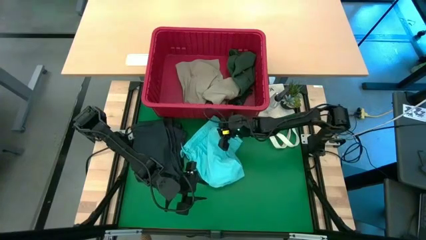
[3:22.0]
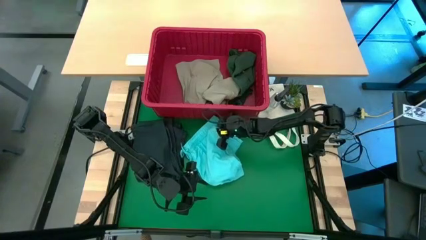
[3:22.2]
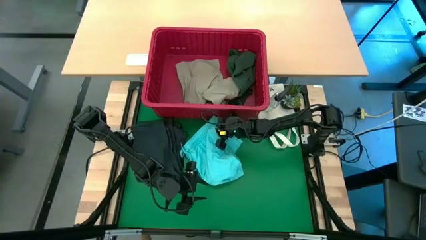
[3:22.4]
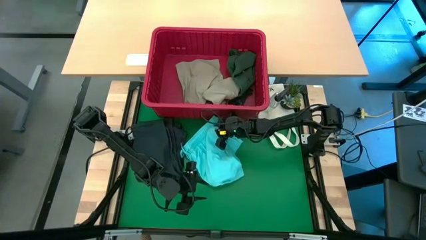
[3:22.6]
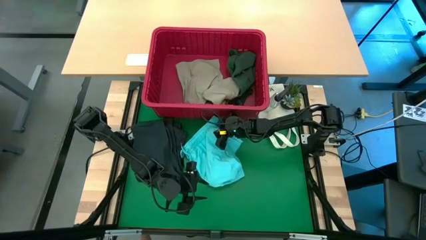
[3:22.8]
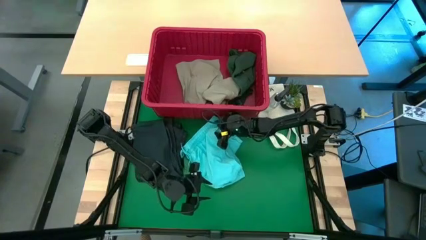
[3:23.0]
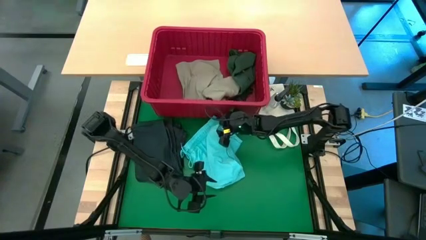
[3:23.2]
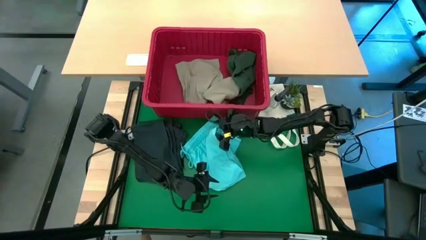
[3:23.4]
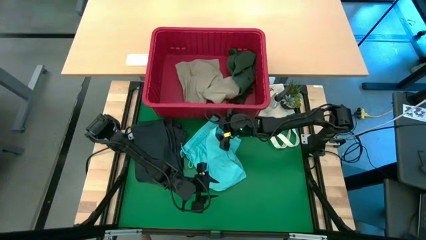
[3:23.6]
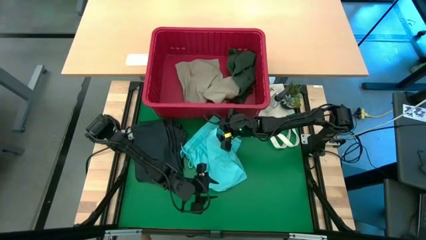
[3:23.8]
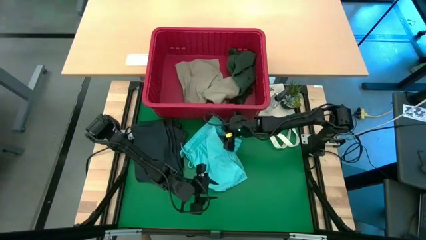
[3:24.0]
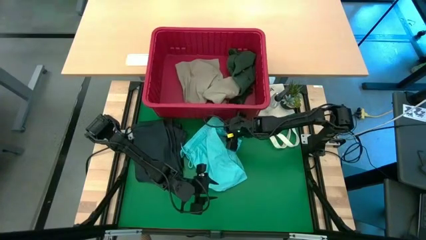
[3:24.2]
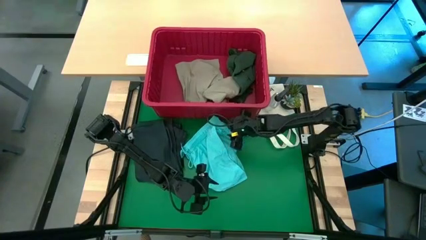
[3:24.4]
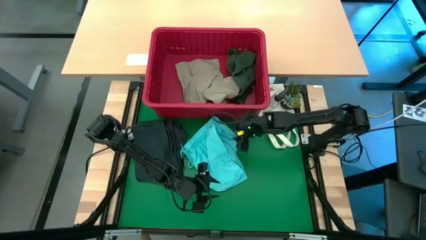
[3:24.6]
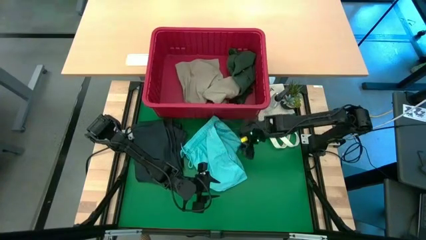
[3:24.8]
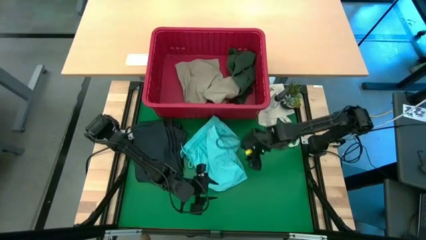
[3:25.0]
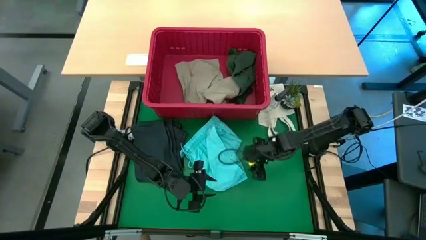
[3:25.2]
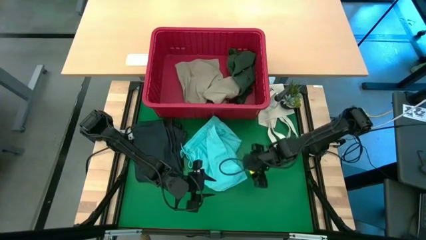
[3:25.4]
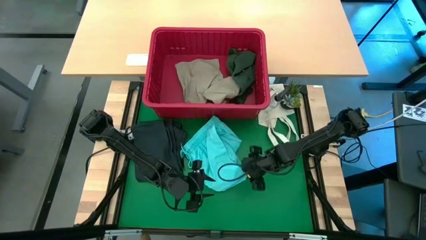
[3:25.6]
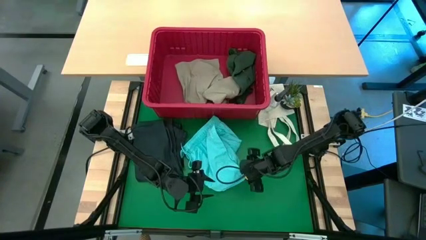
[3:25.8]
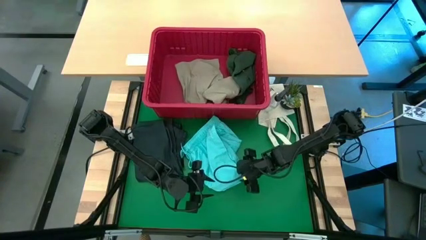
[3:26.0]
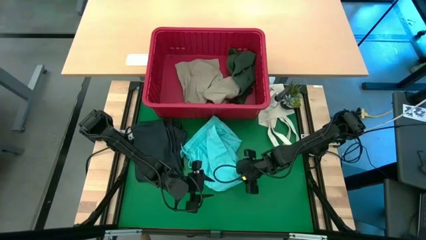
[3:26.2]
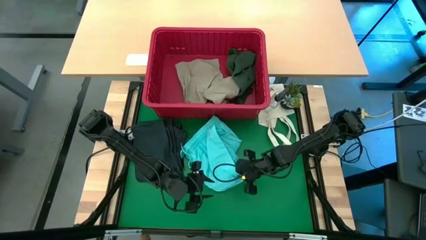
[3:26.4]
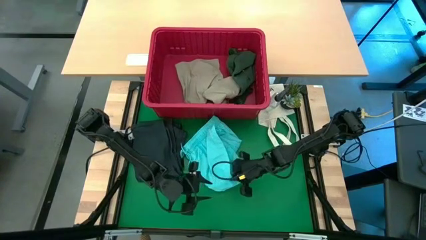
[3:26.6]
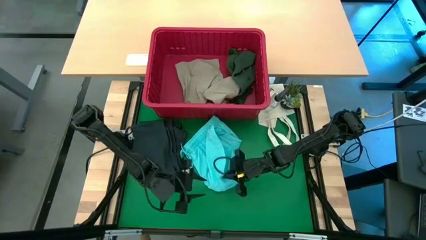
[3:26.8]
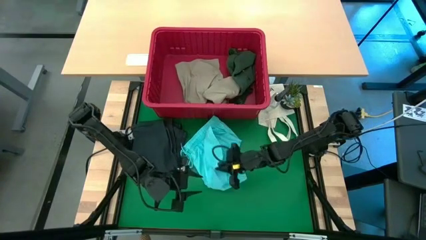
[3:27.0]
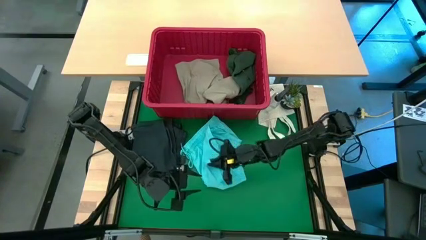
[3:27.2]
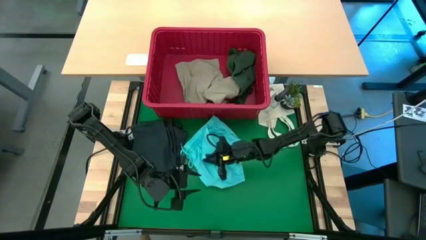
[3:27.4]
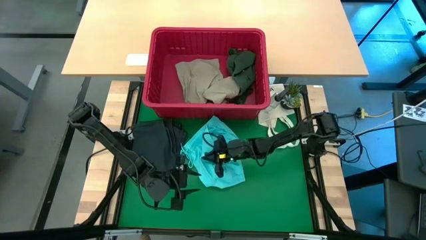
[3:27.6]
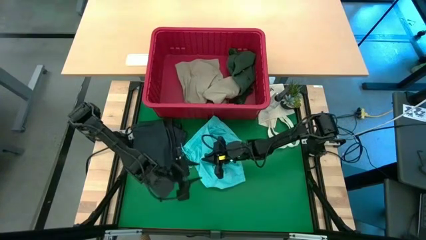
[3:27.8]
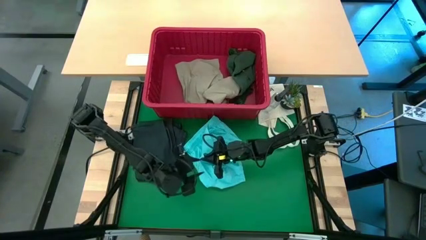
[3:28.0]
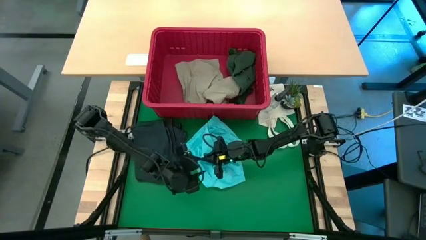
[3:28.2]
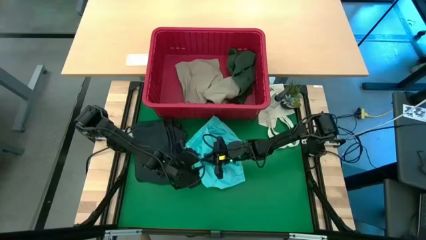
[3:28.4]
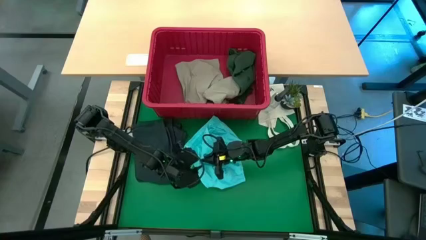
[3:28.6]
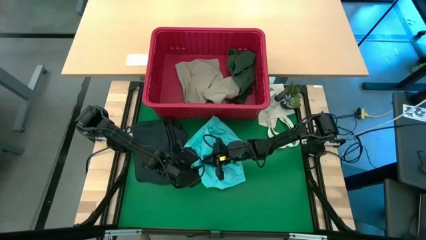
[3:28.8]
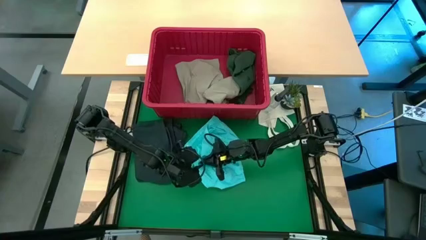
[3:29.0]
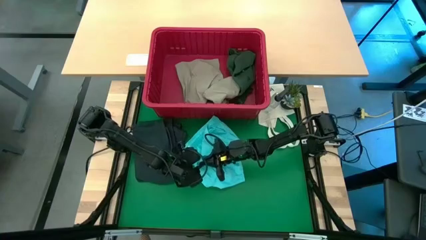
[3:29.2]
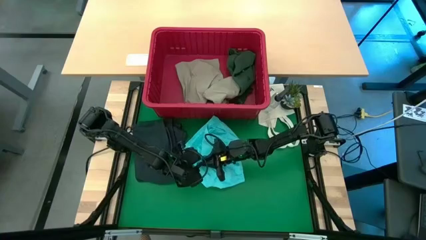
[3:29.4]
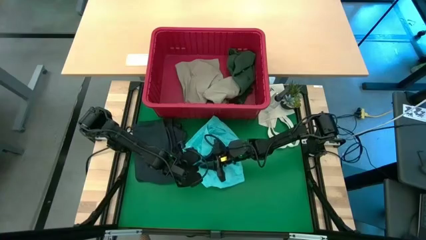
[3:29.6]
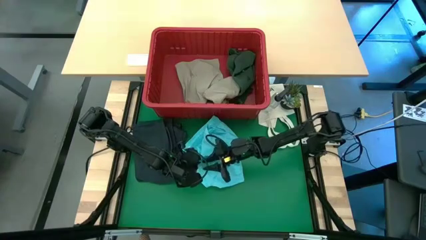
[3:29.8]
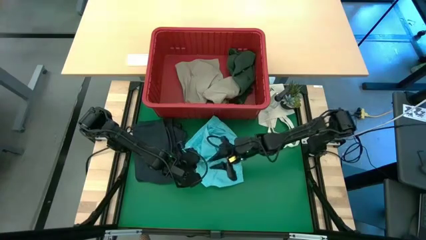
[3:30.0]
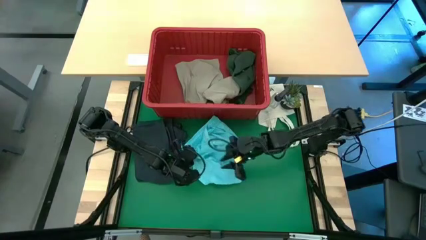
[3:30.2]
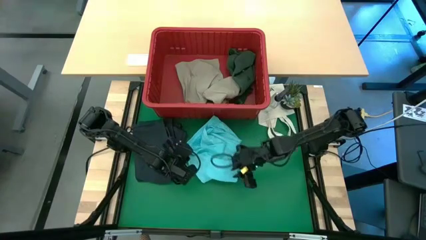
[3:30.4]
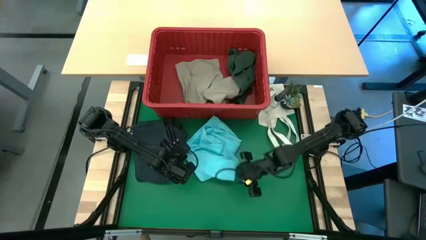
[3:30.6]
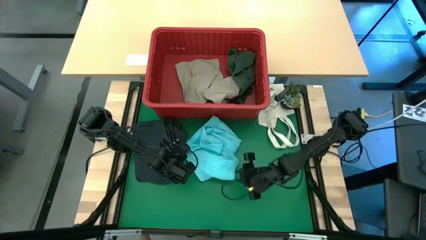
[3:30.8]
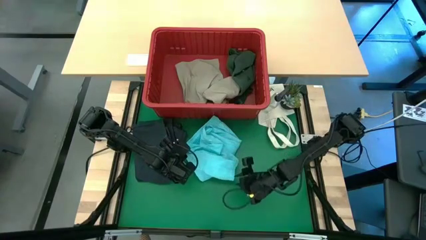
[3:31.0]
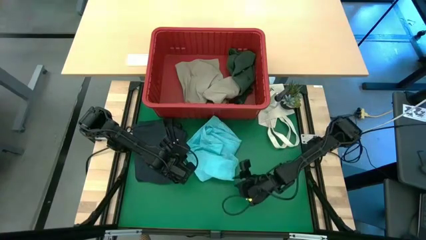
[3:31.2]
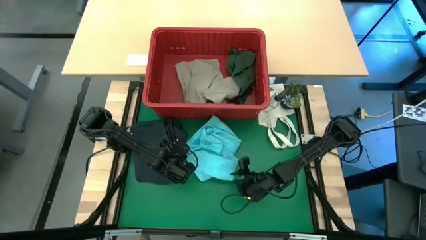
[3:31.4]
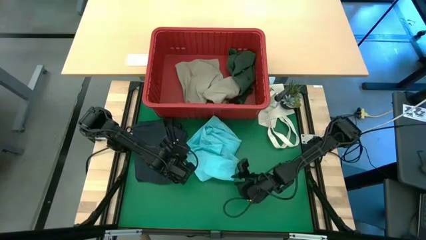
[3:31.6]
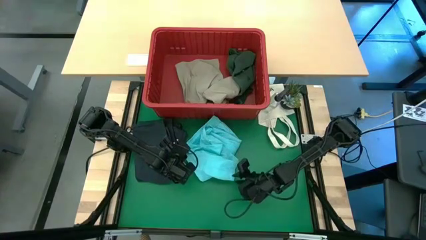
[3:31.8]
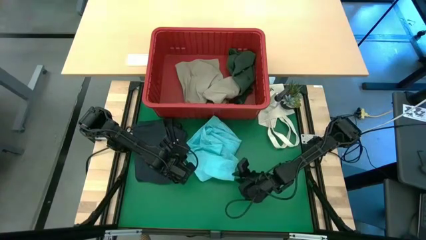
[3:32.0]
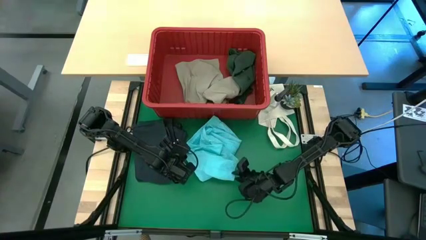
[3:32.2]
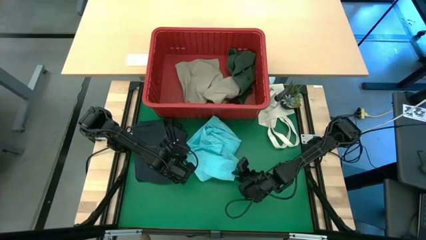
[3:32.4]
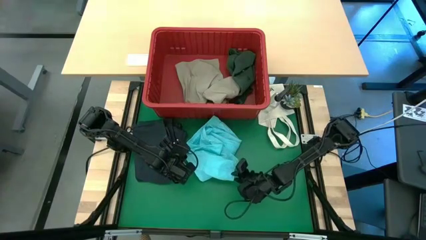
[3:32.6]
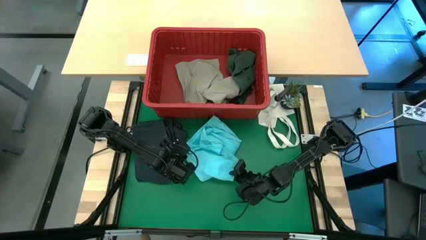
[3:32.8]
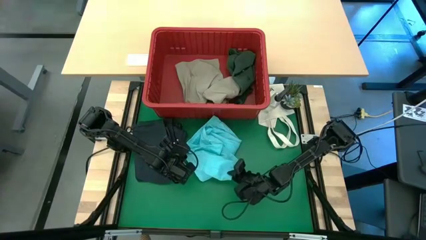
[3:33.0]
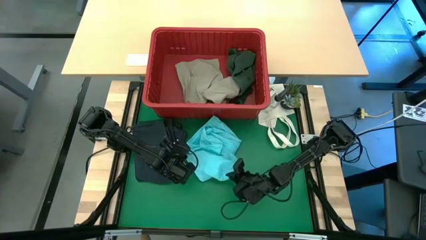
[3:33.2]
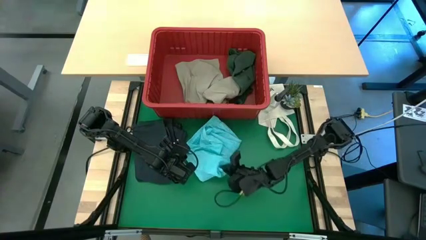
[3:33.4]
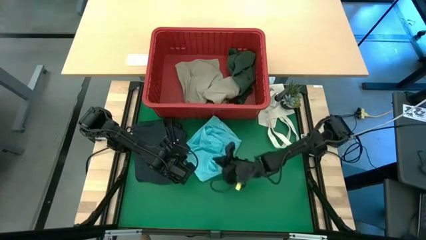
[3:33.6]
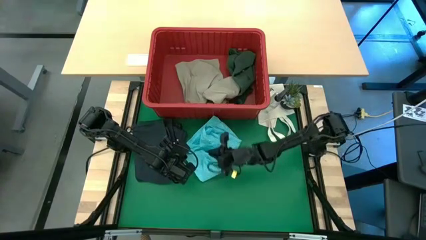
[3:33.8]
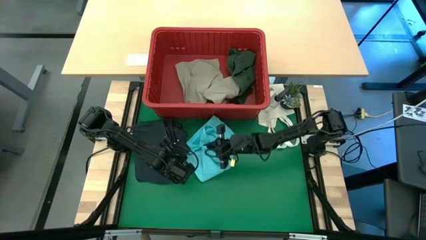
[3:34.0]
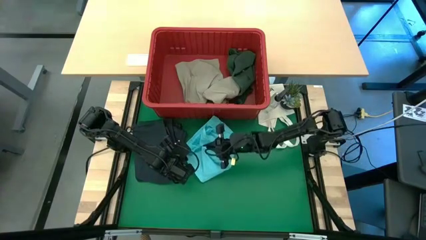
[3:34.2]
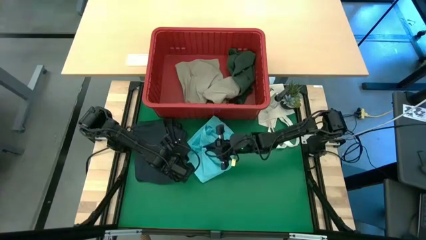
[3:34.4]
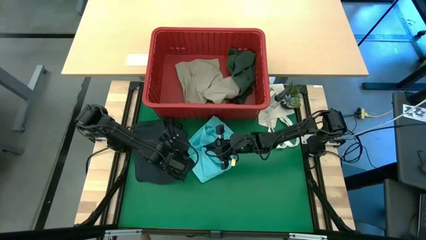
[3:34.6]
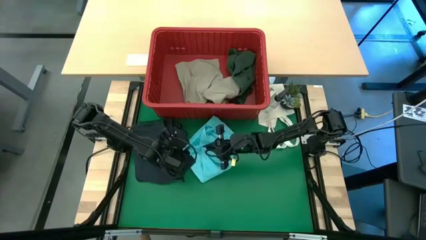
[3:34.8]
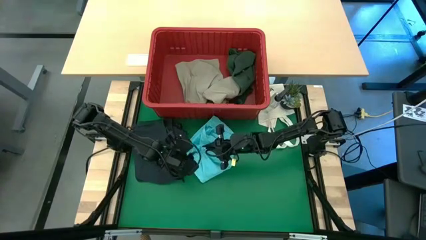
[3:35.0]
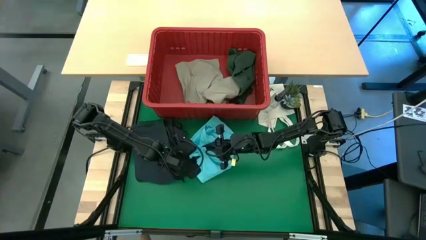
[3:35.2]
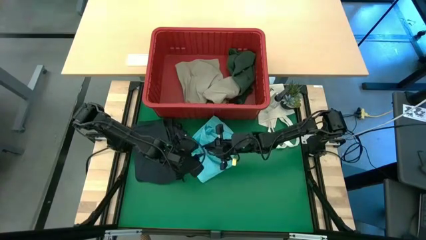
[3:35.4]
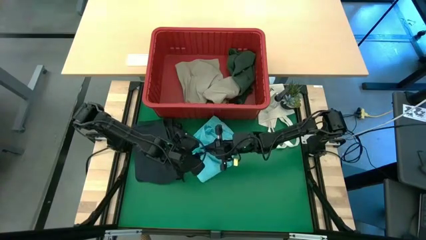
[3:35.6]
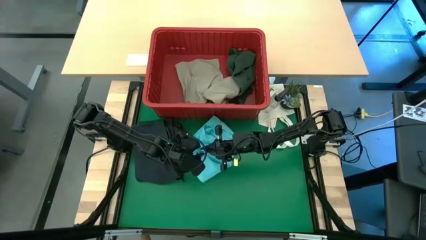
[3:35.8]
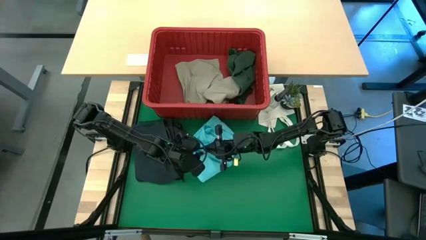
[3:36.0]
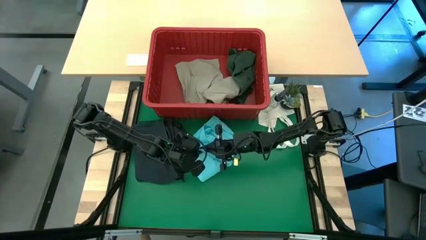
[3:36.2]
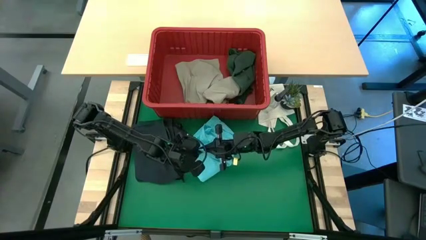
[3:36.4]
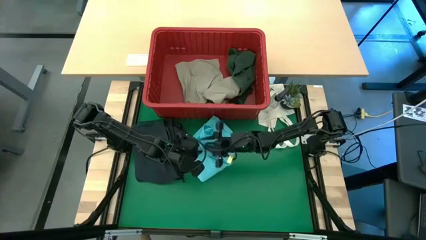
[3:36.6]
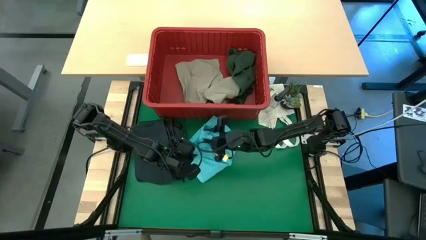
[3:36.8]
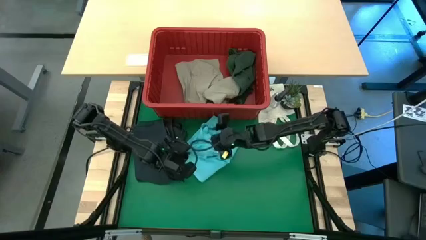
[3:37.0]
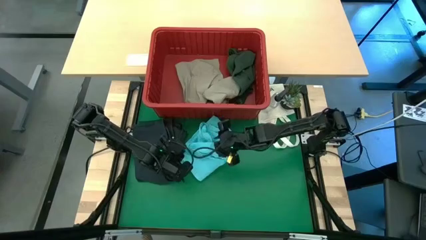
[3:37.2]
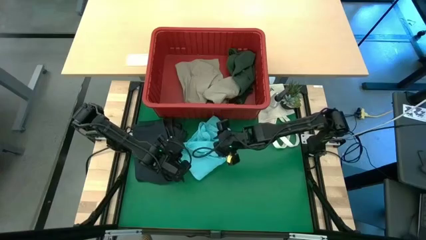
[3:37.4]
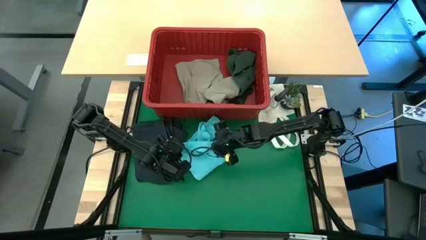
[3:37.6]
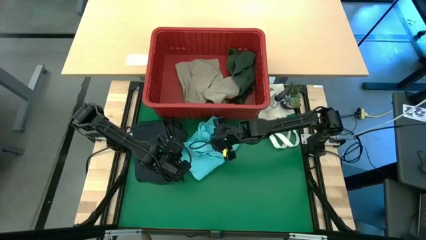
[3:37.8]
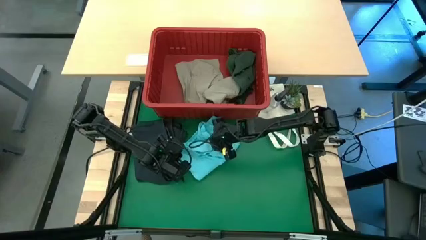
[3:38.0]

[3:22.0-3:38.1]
Task: Fold Laundry from Bin
Fold the blue shorts from the red laundry bin

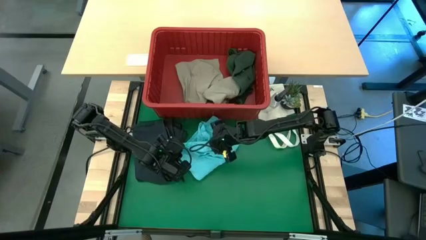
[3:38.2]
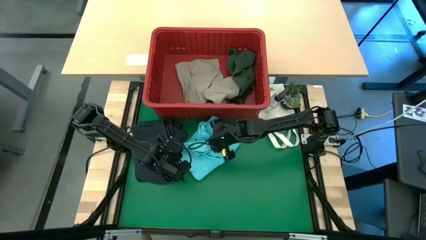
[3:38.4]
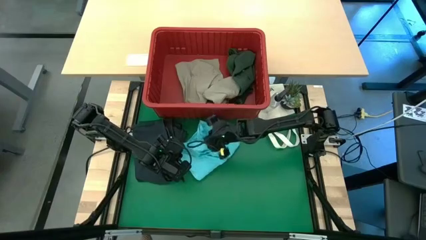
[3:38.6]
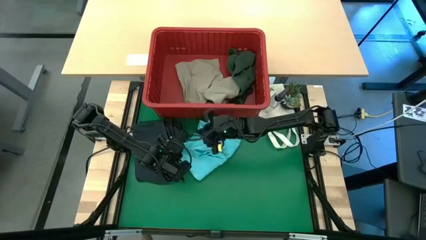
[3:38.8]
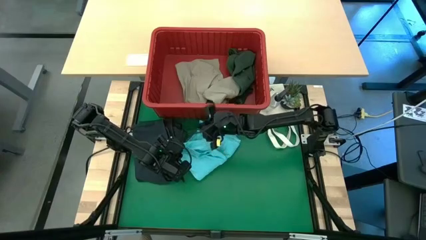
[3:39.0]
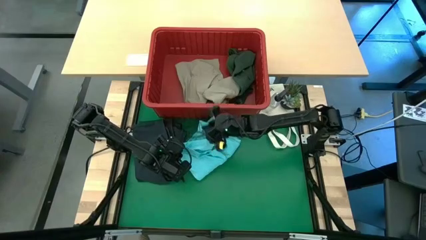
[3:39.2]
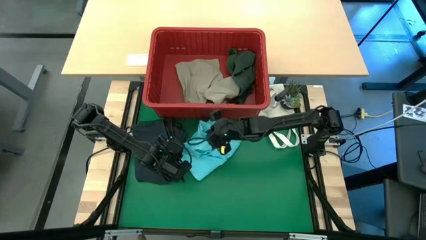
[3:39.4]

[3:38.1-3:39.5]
Fold the blue shorts from the red laundry bin
